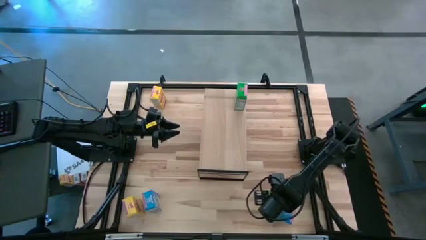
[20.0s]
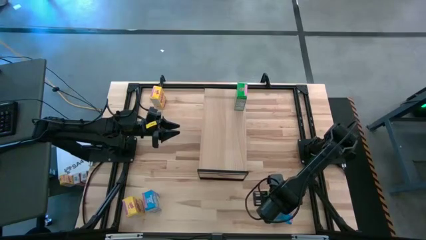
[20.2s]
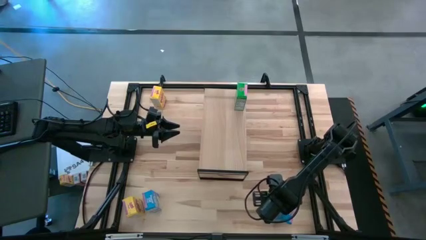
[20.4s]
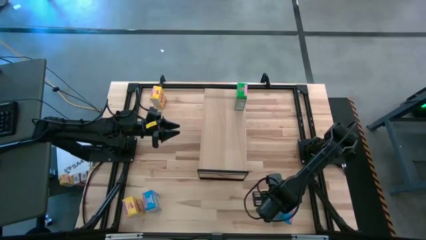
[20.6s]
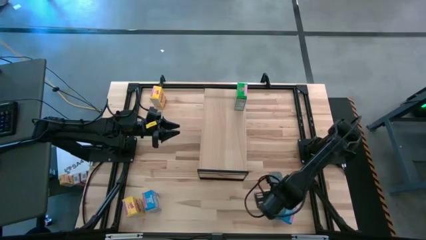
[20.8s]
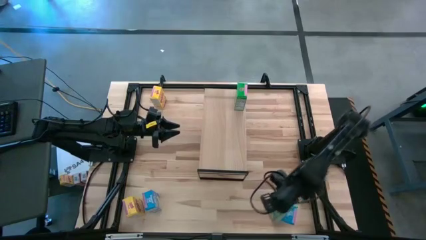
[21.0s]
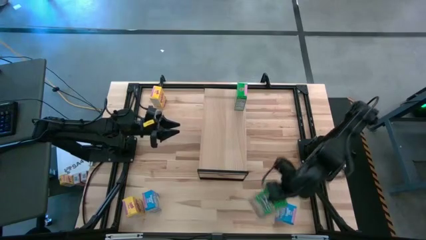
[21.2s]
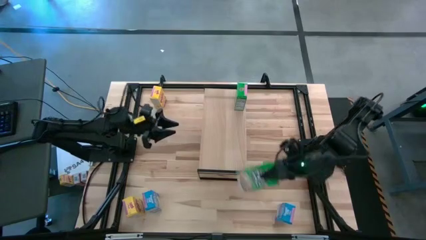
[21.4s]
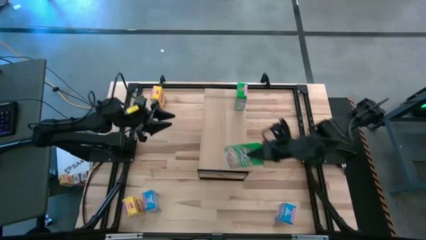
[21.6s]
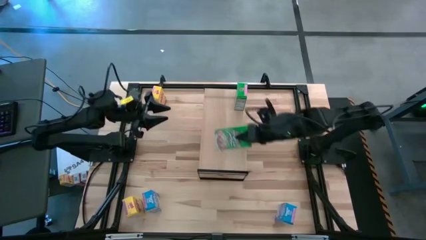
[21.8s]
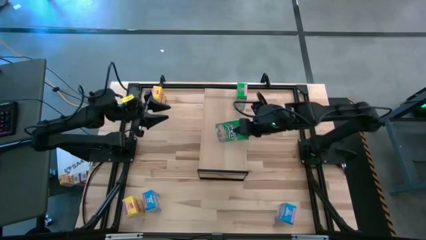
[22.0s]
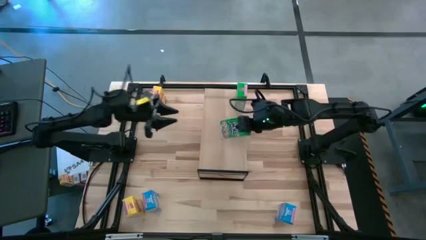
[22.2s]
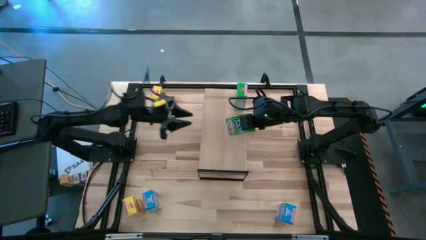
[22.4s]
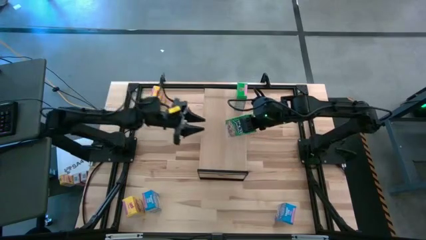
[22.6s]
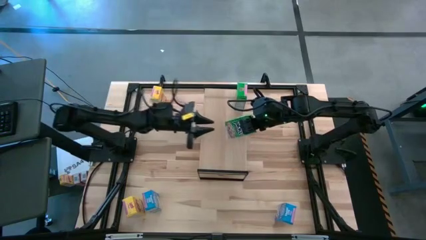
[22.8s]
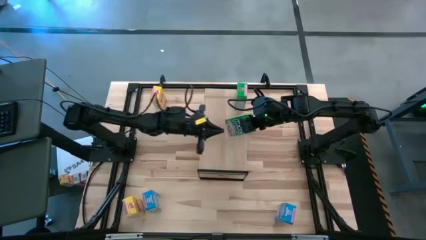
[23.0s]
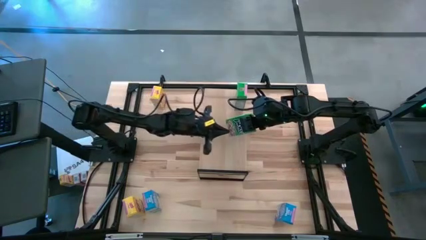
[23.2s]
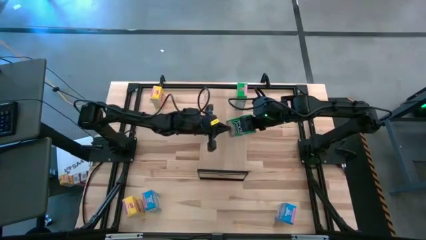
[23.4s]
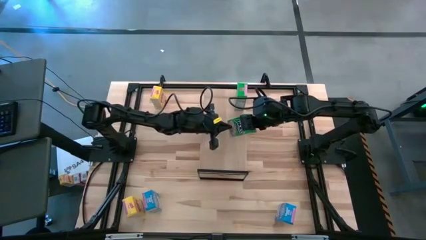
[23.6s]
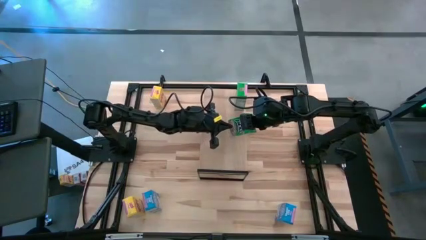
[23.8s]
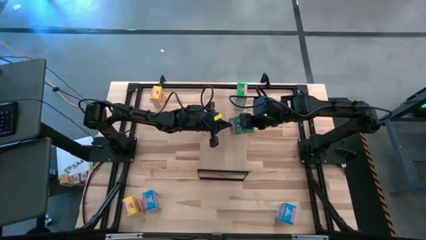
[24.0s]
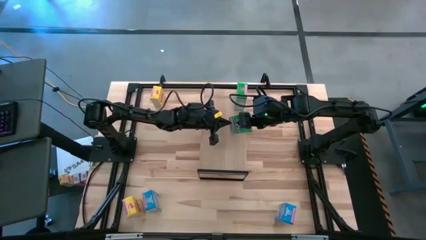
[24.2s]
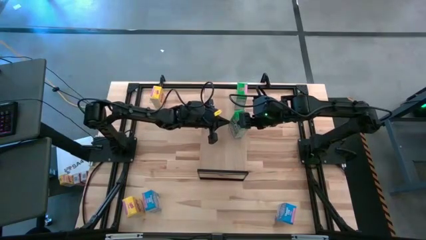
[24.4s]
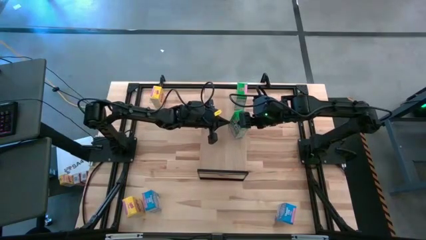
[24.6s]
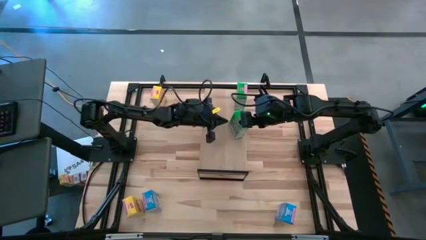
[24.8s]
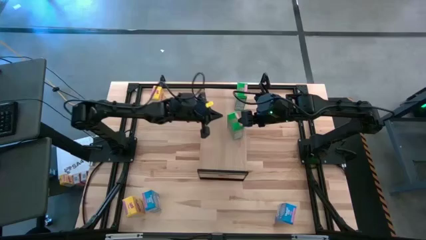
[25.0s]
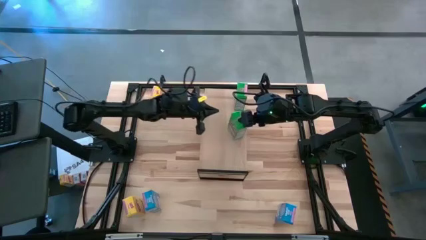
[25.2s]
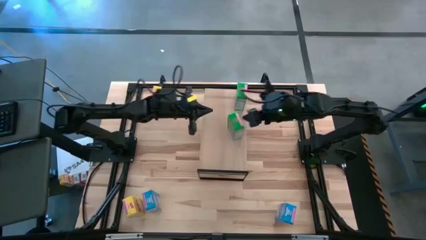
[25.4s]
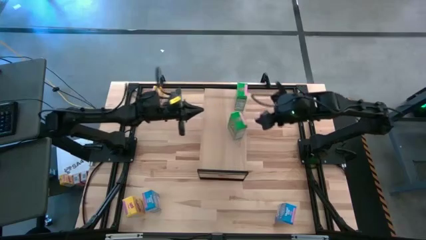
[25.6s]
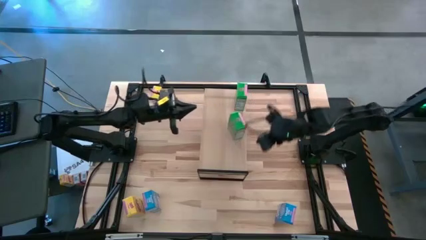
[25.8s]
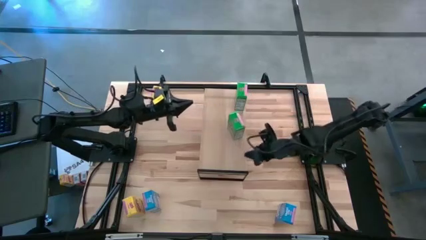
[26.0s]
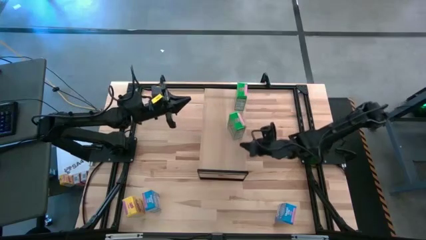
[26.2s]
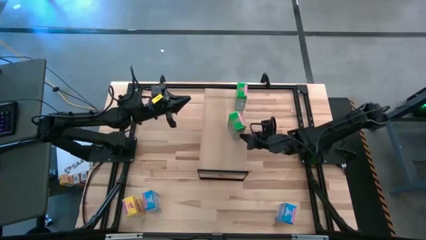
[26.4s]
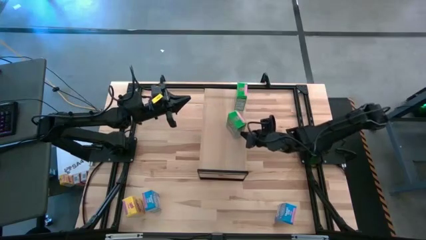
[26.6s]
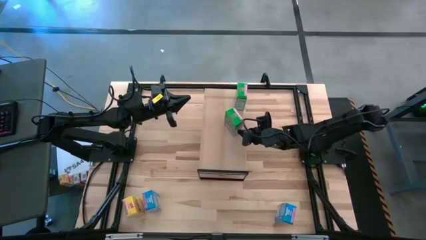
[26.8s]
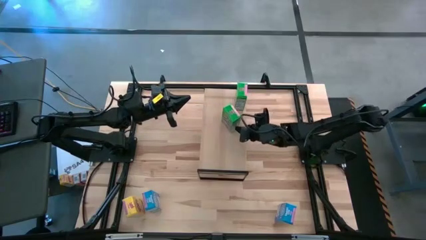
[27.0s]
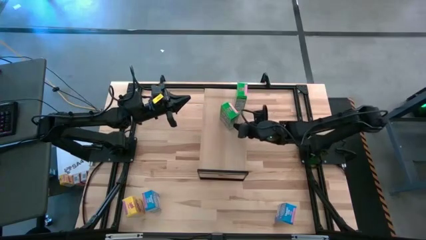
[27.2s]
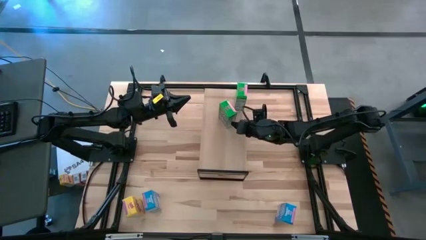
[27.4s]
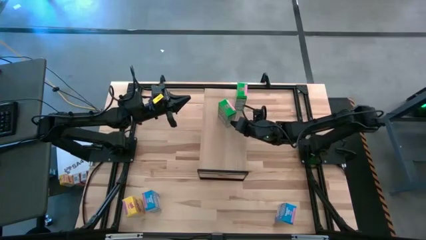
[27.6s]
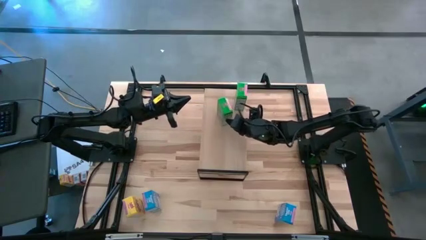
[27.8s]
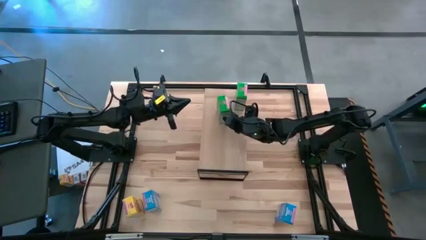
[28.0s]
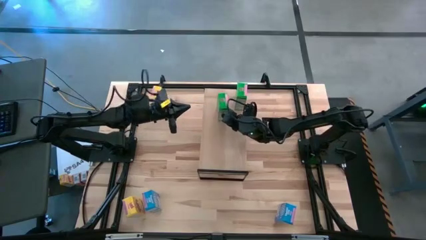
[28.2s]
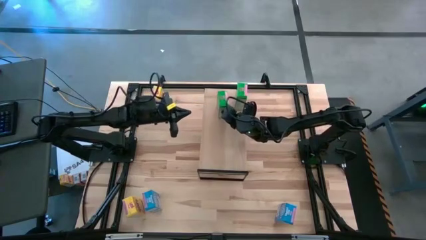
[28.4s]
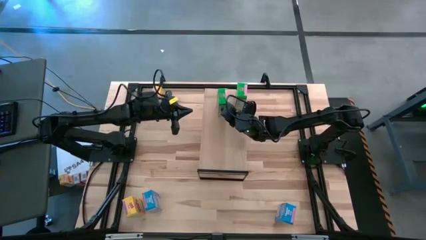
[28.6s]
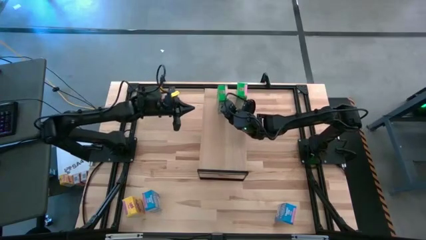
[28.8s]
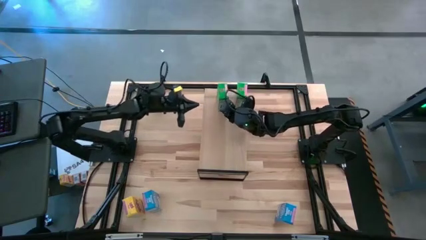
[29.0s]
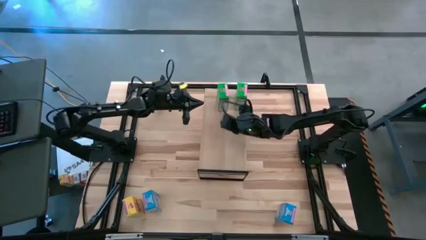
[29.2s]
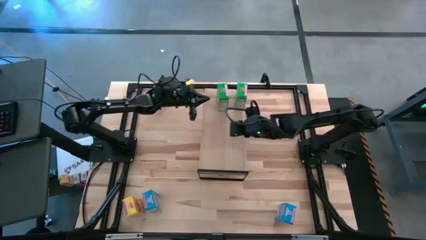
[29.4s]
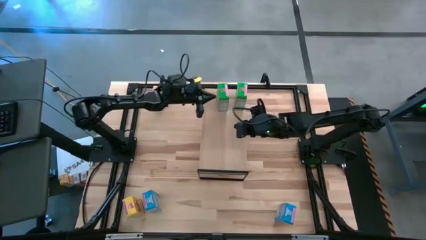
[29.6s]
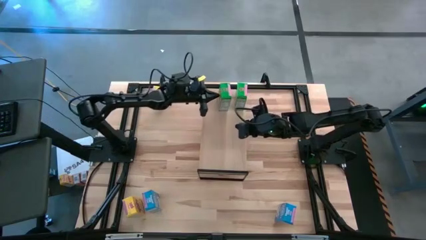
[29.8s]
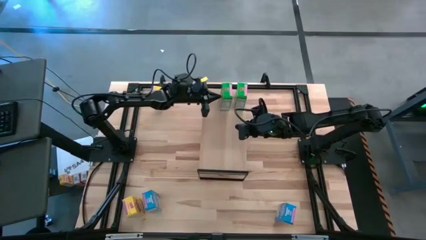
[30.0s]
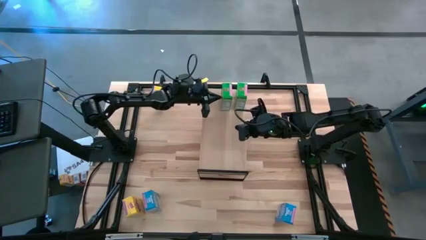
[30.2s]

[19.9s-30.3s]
Task: Stack cereal on shelf
Put the green cereal box on the shelf
